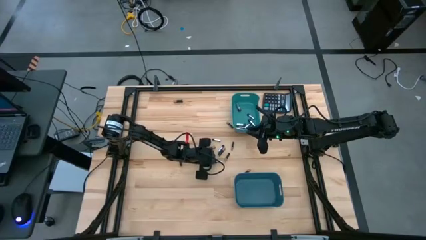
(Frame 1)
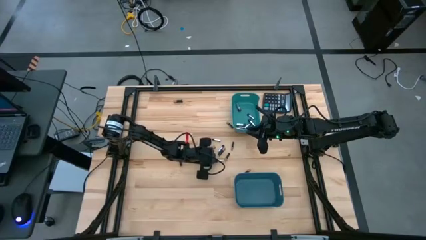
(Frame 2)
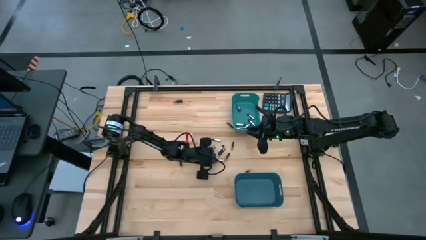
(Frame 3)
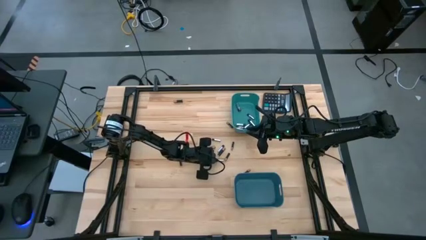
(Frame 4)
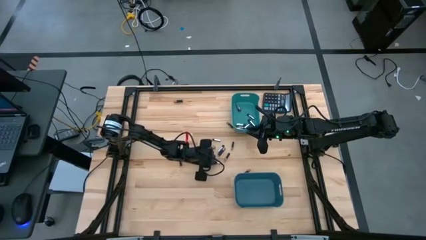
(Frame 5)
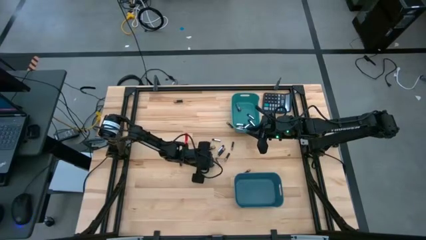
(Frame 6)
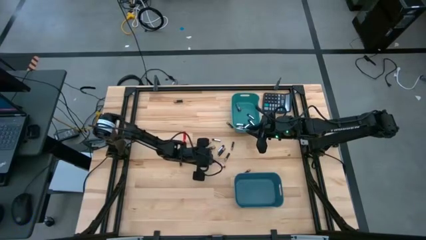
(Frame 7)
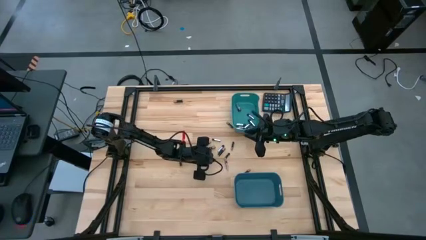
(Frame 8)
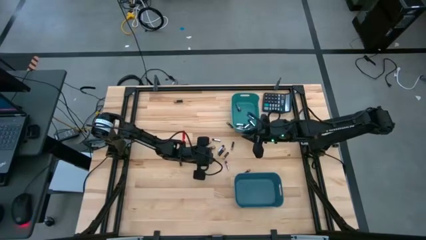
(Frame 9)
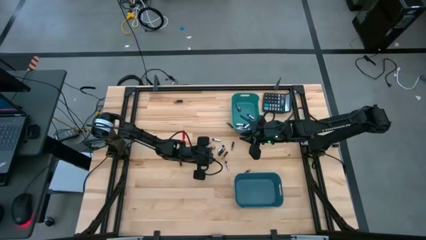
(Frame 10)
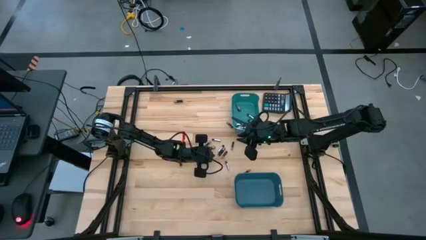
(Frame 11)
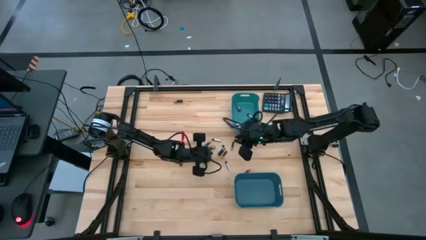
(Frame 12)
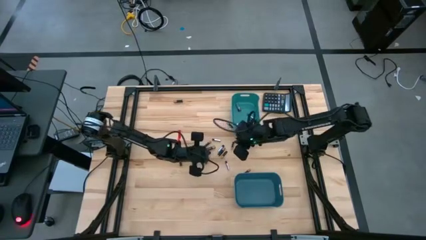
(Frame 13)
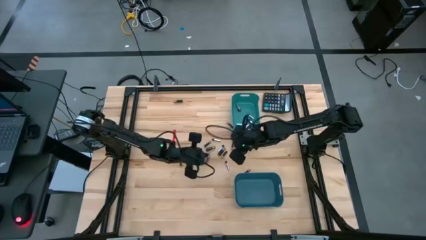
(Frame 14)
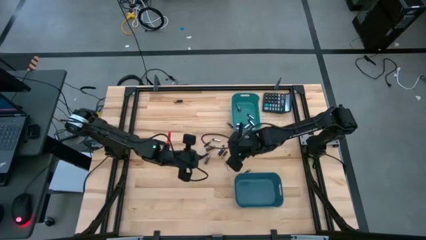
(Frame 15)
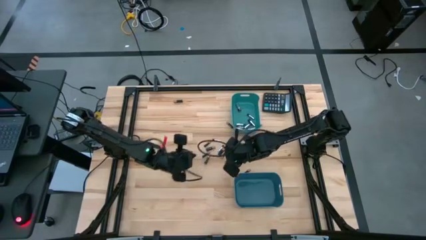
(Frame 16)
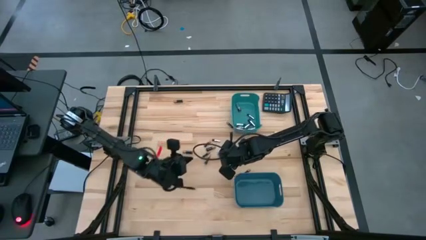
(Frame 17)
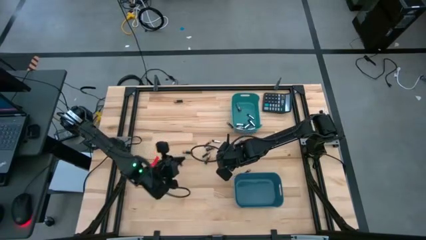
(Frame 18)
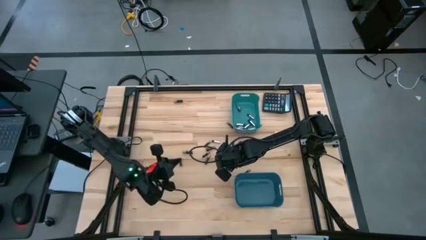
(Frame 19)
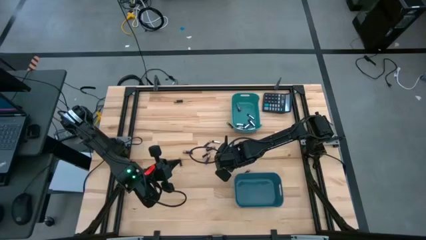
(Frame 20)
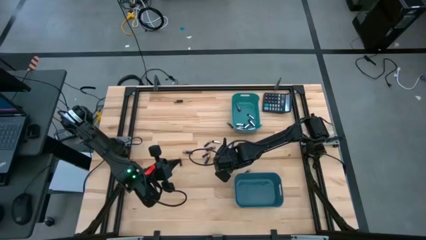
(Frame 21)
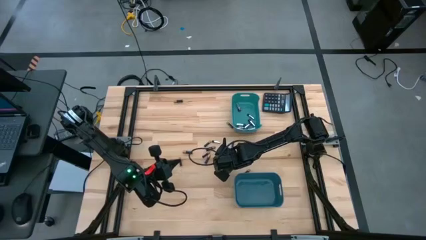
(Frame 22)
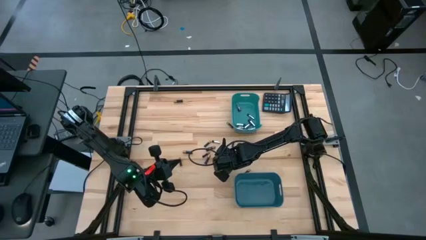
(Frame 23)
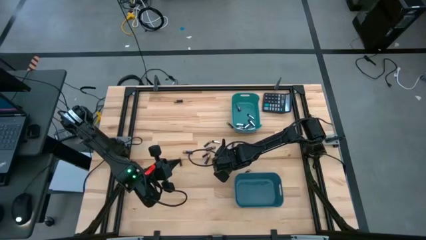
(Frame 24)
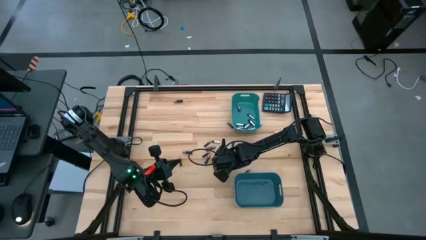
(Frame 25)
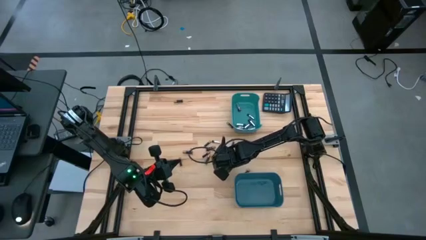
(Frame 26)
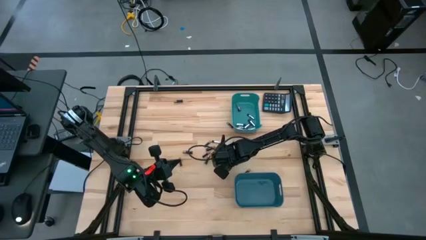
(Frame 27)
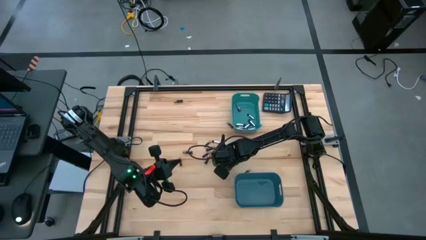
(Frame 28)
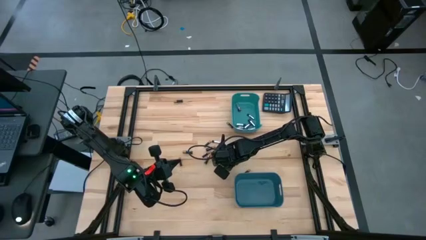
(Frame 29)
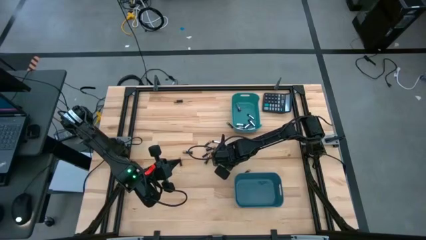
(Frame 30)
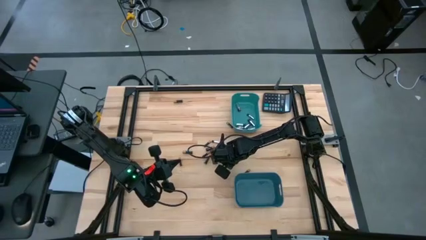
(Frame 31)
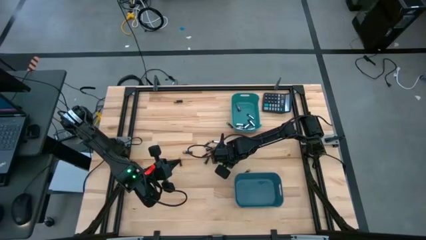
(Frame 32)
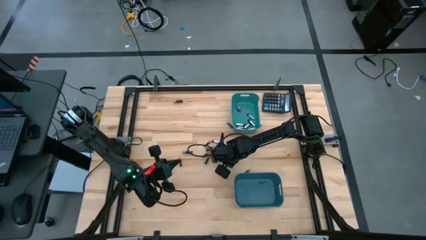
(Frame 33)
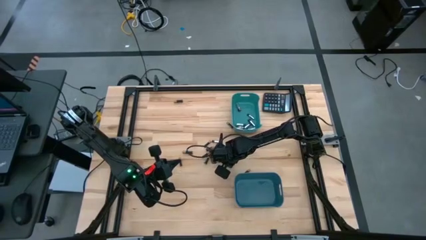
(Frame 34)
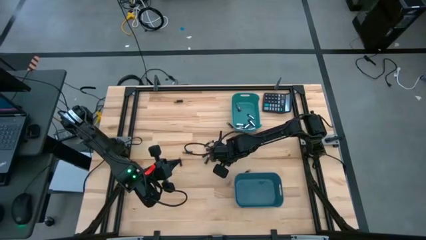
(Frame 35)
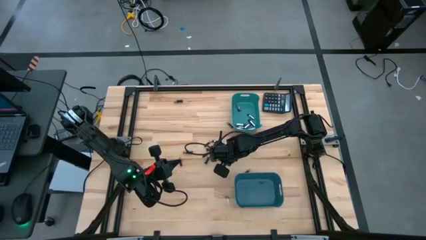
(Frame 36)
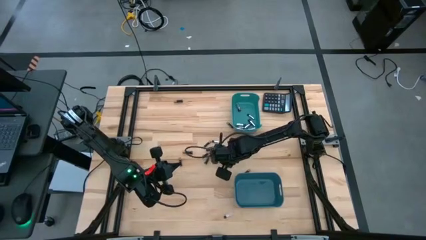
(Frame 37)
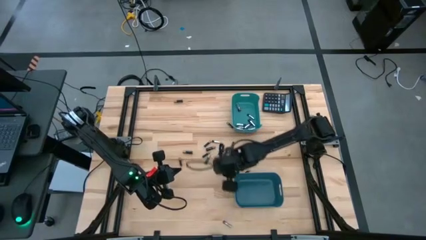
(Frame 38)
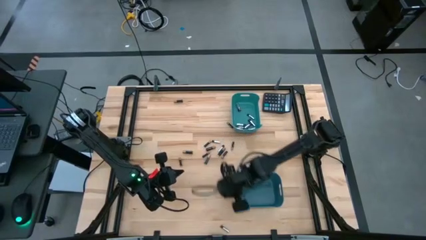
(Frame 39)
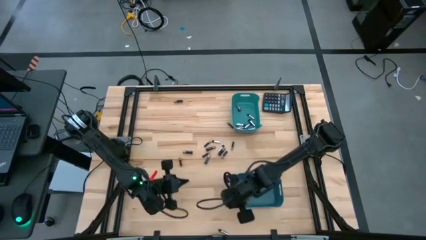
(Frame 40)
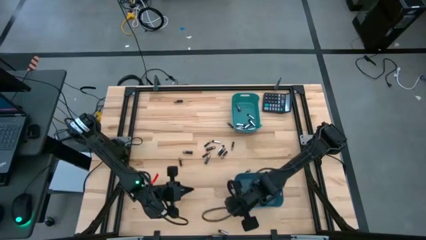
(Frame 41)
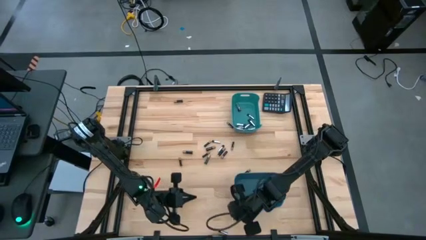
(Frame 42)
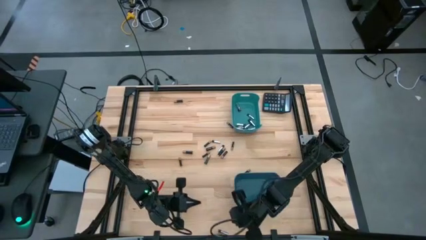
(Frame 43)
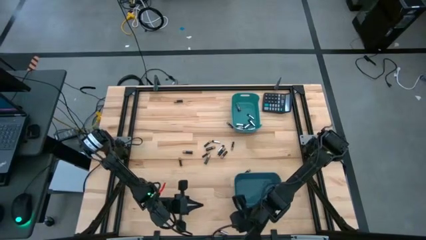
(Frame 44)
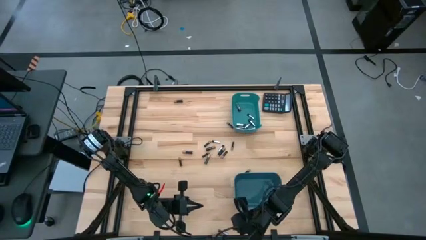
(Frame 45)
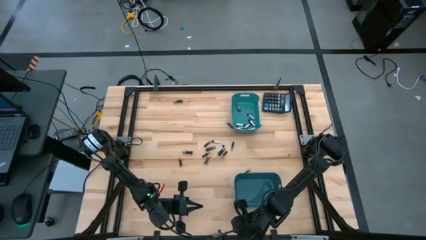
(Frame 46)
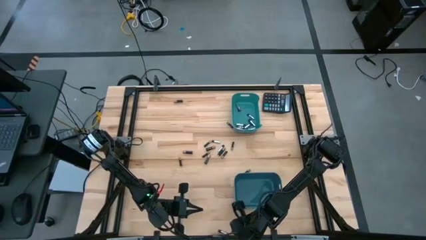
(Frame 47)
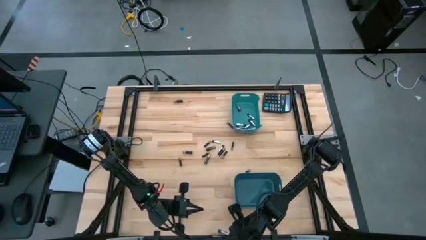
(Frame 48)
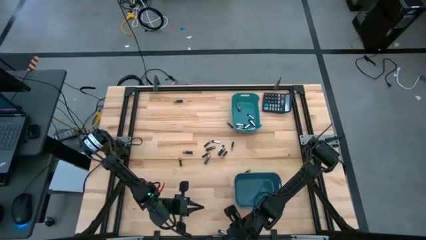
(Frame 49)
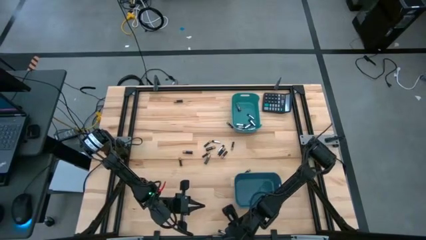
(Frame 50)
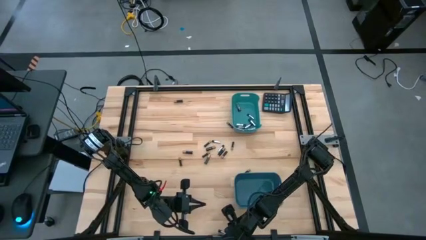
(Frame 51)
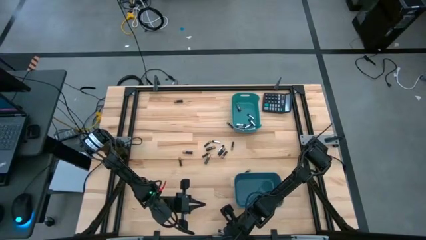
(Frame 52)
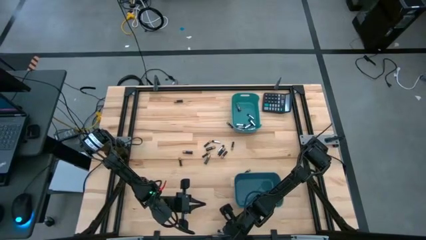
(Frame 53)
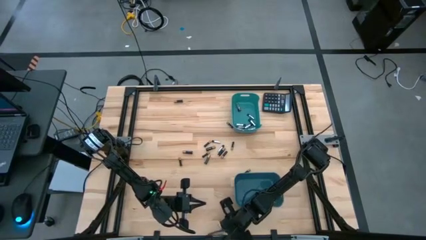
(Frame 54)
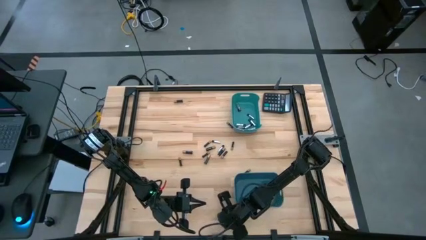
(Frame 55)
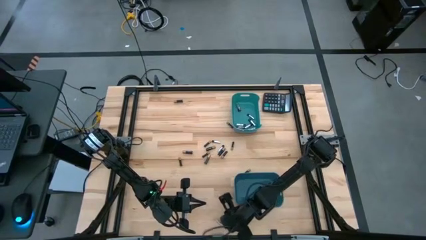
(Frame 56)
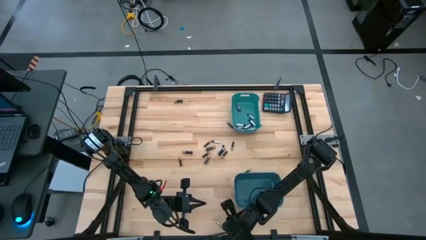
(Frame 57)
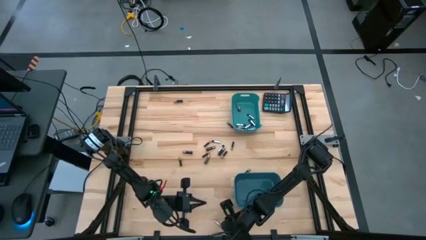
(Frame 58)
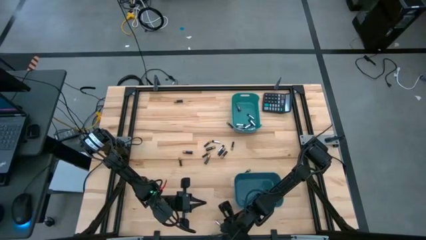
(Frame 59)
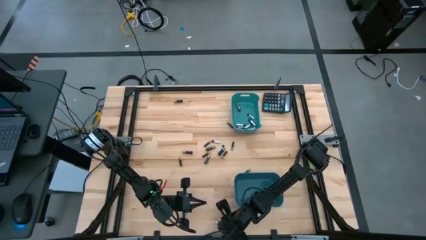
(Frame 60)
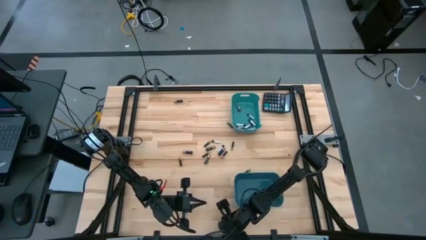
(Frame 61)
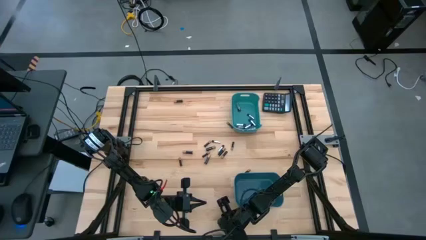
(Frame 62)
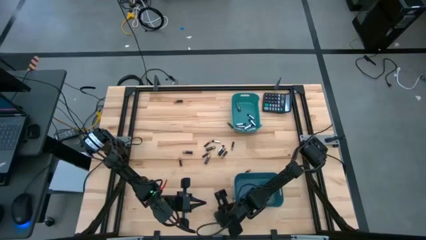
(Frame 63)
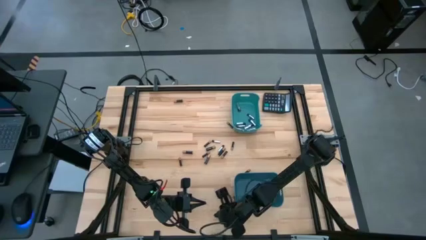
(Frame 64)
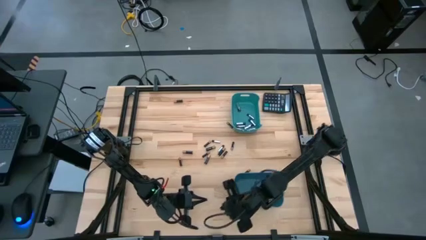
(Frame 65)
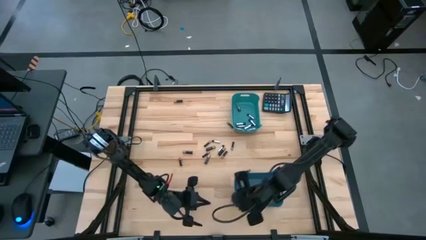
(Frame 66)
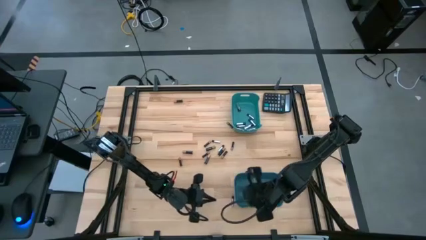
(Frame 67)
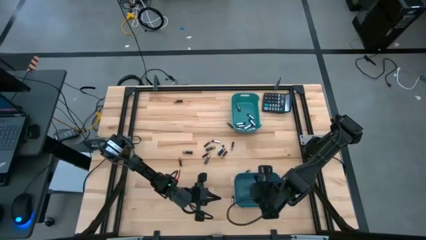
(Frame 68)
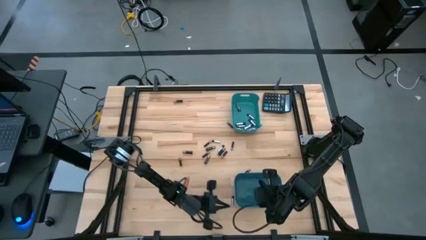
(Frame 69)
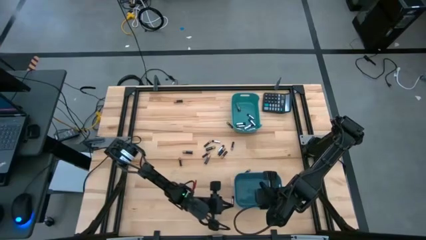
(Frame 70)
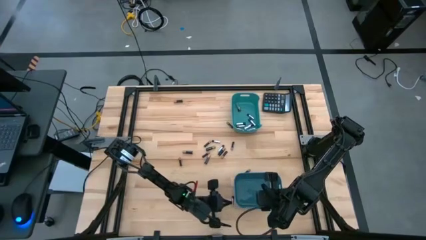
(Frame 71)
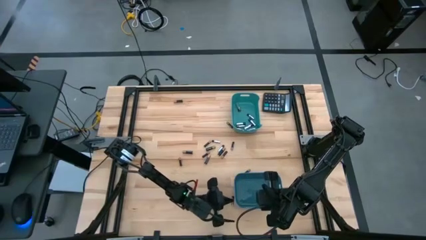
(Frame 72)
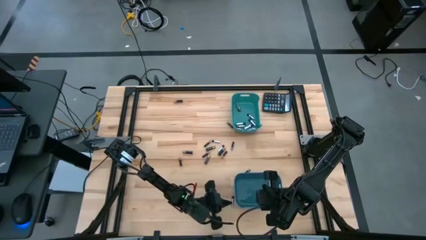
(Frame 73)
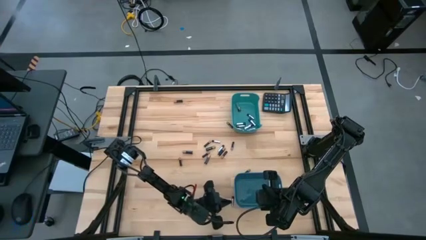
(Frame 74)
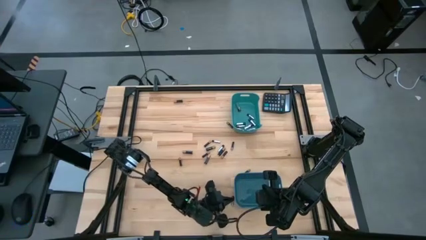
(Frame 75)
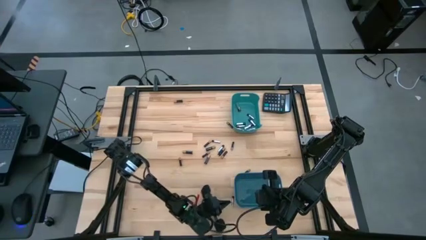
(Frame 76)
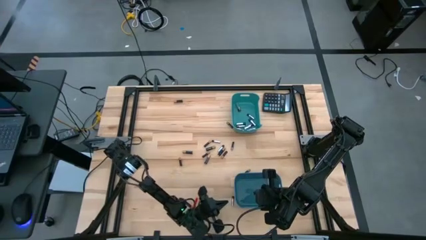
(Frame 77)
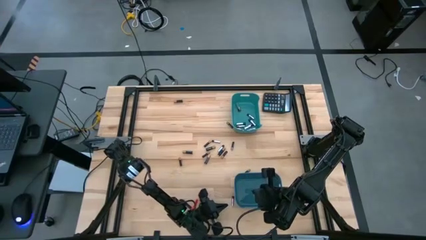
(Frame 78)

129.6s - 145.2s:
Task: Sort batteries
Put the silver battery into the green bin

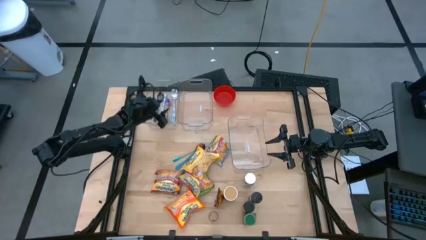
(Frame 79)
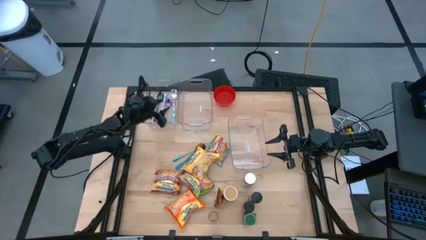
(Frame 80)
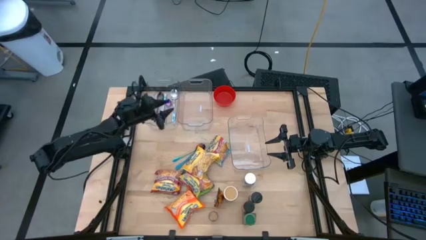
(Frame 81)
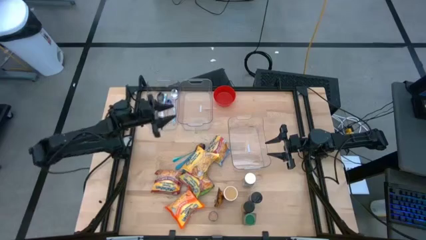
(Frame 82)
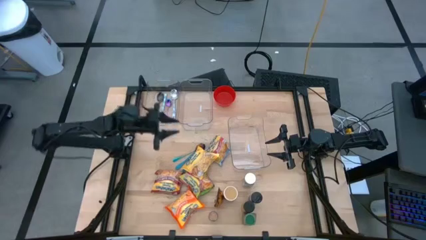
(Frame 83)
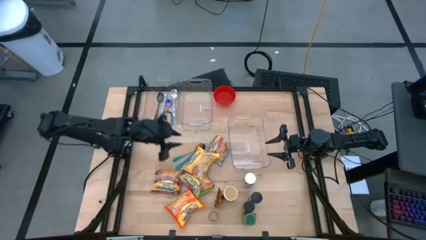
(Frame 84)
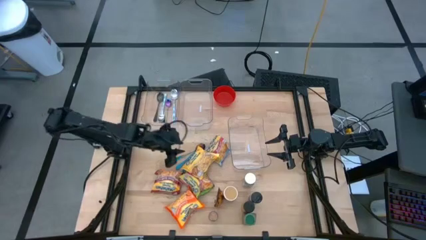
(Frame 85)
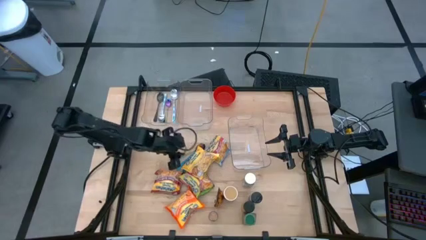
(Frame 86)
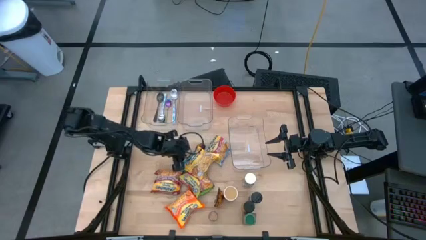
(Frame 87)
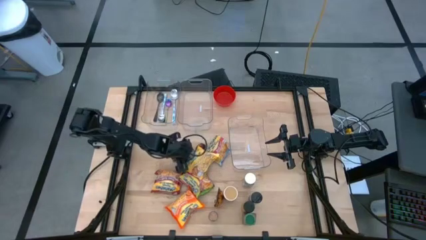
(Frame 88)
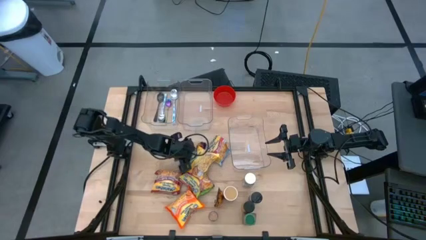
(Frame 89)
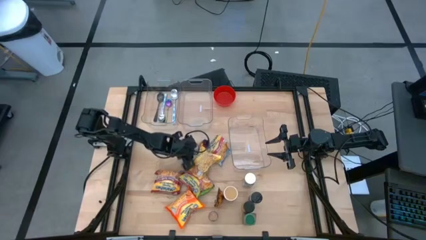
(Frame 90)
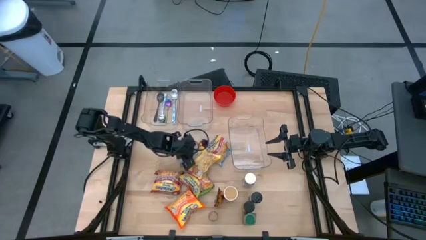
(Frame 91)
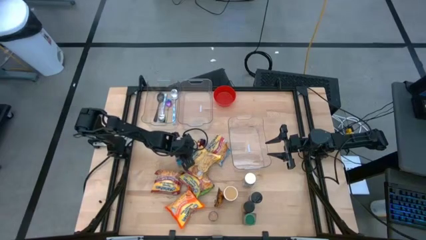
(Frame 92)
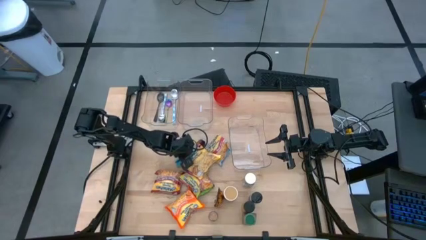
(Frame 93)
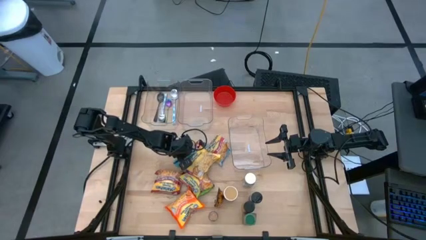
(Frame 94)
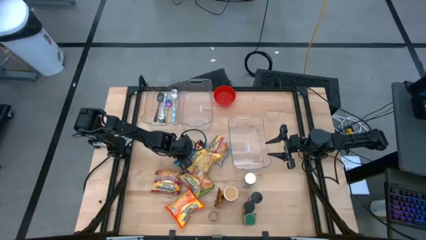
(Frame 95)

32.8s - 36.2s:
Task: Pick & Place Food Item
Put the left violet spoon into the top left transparent bin
